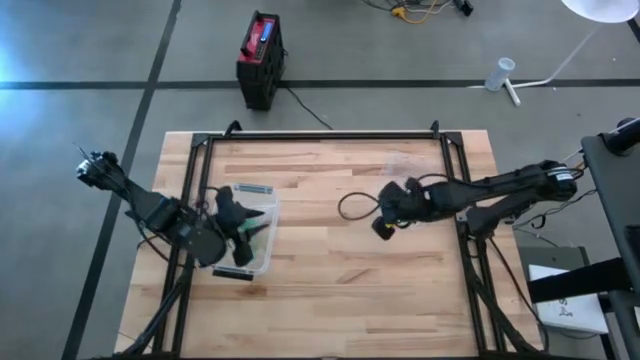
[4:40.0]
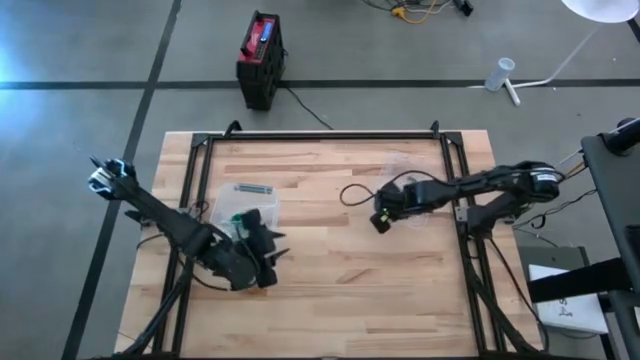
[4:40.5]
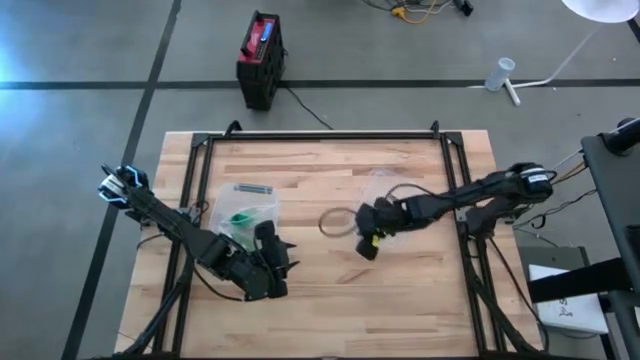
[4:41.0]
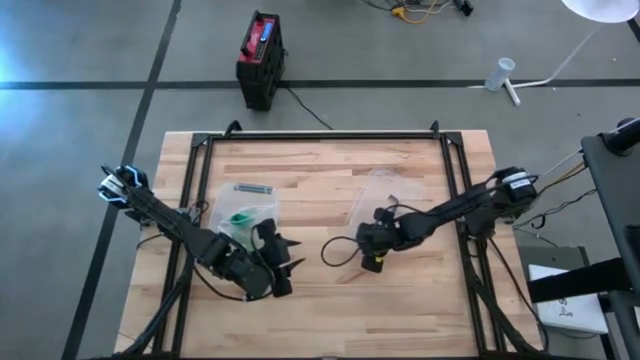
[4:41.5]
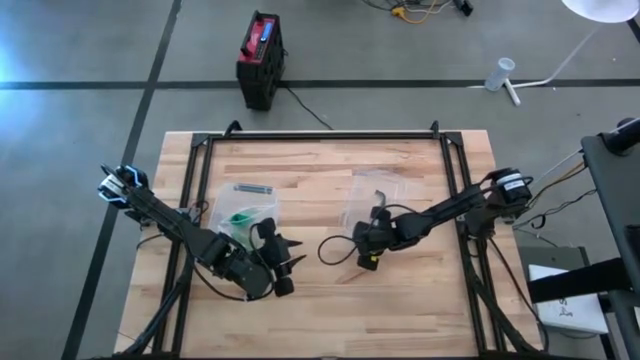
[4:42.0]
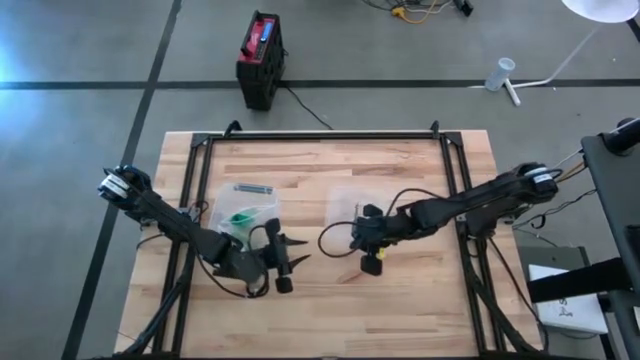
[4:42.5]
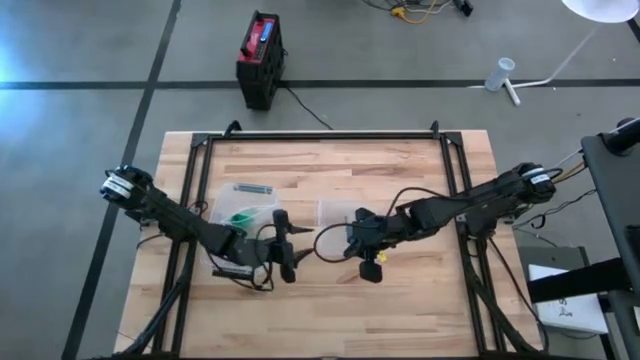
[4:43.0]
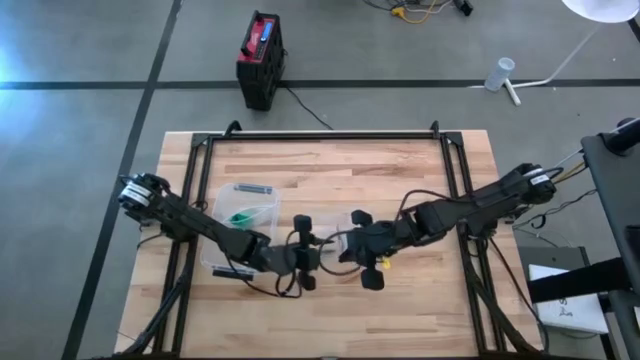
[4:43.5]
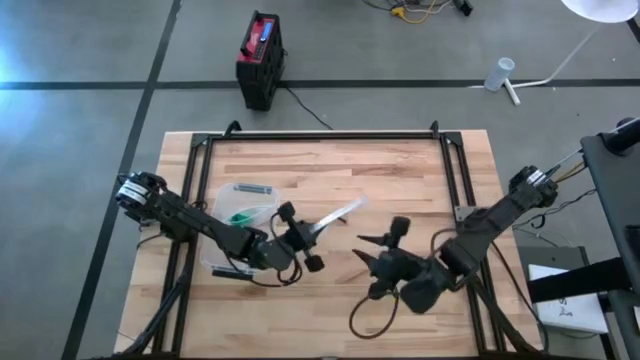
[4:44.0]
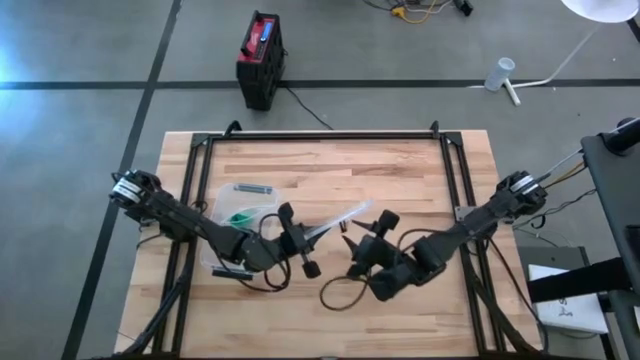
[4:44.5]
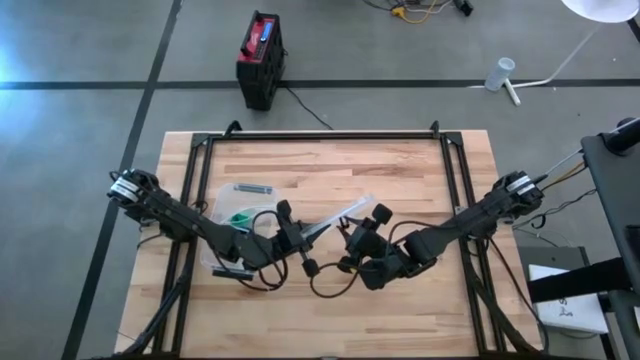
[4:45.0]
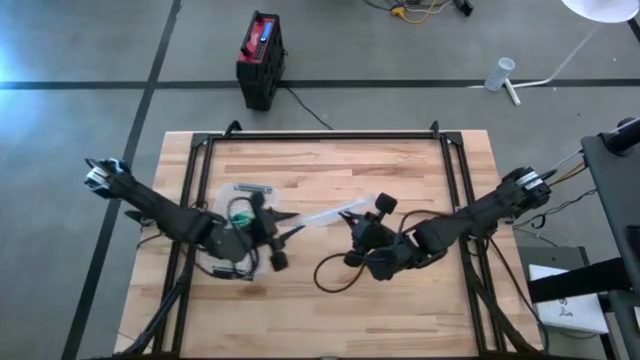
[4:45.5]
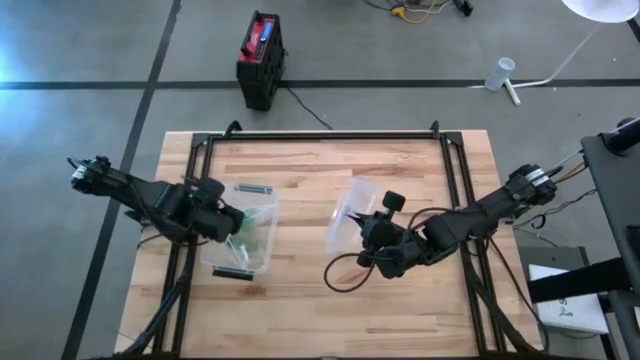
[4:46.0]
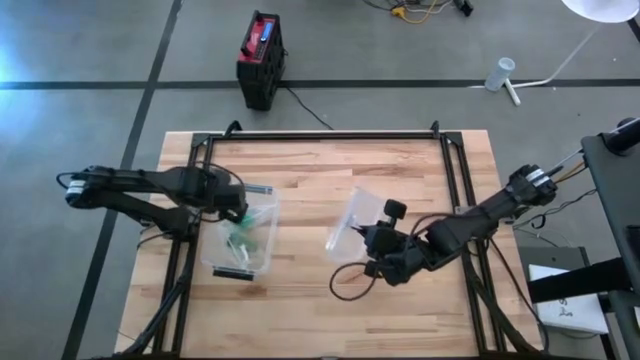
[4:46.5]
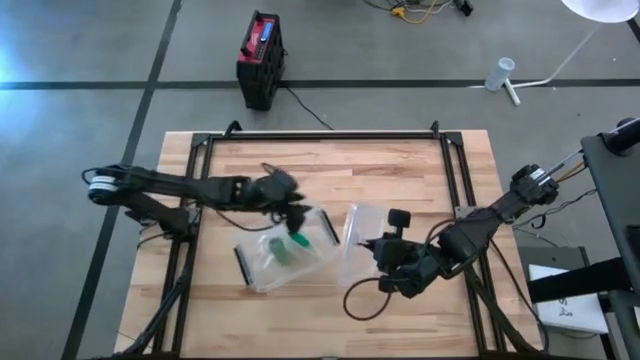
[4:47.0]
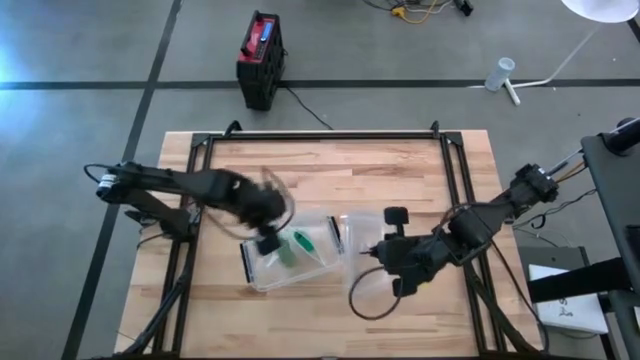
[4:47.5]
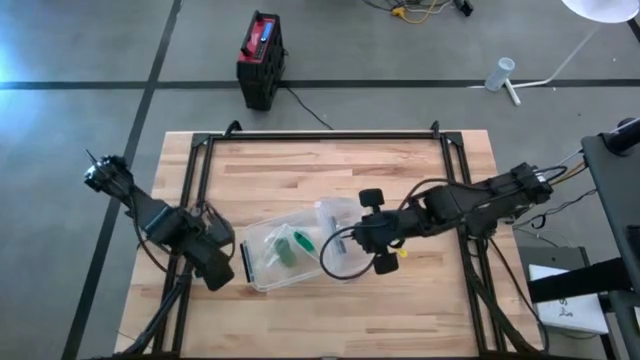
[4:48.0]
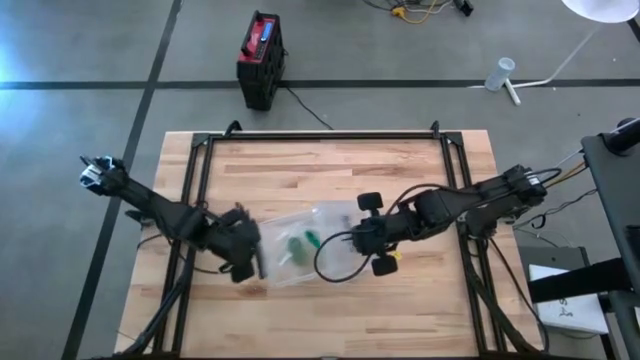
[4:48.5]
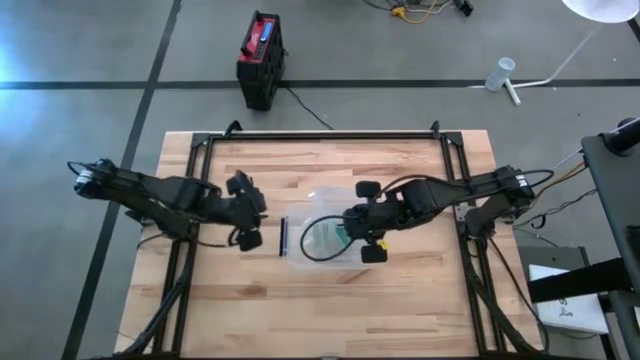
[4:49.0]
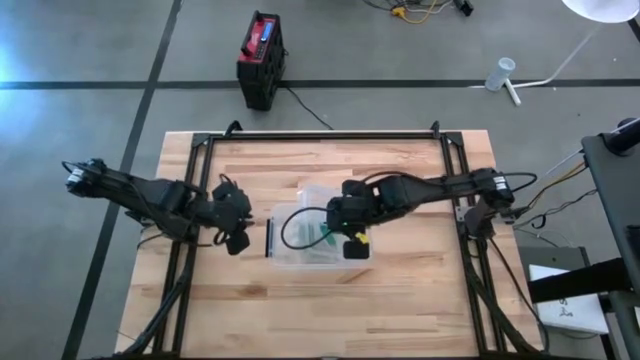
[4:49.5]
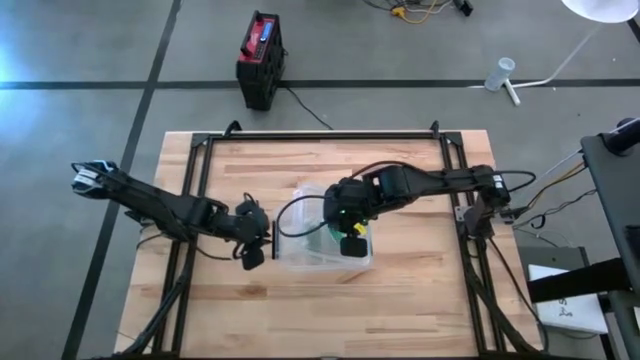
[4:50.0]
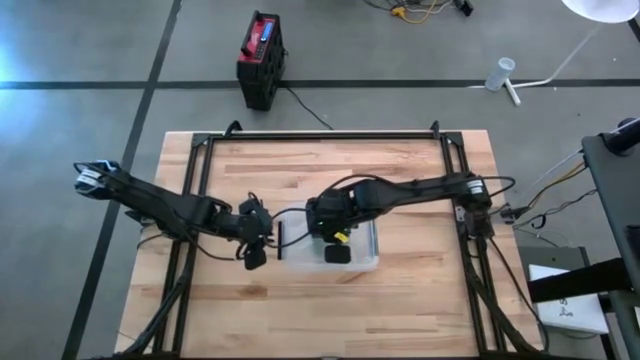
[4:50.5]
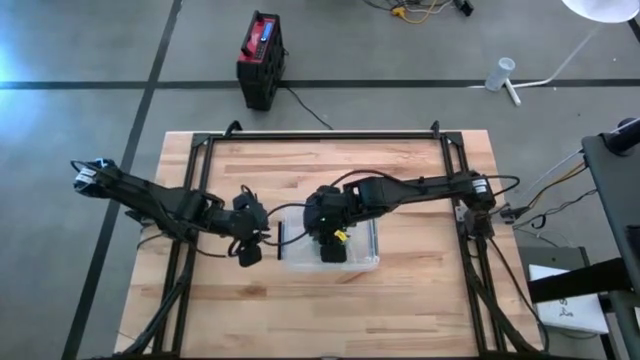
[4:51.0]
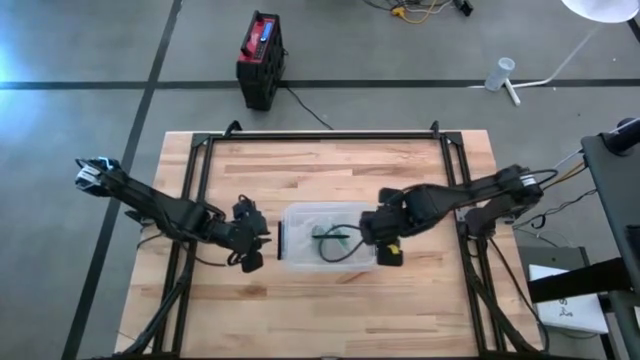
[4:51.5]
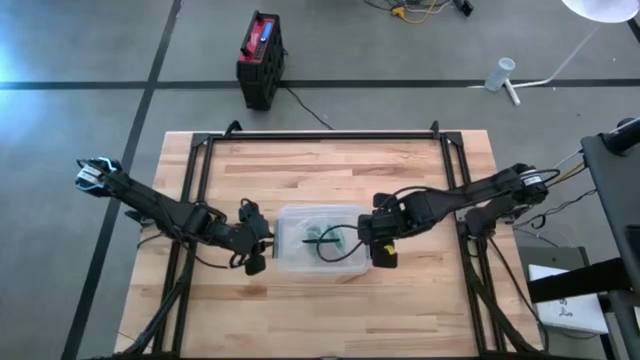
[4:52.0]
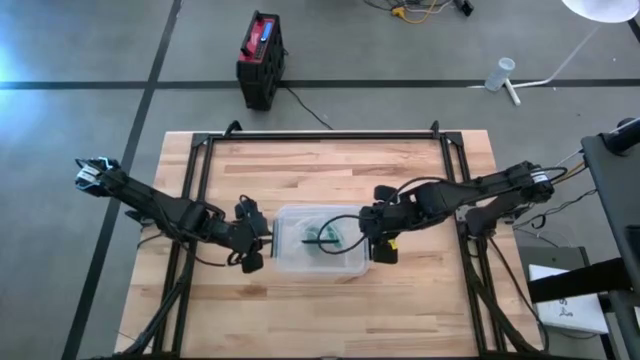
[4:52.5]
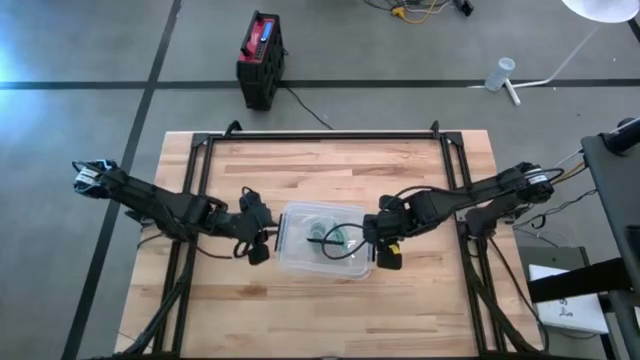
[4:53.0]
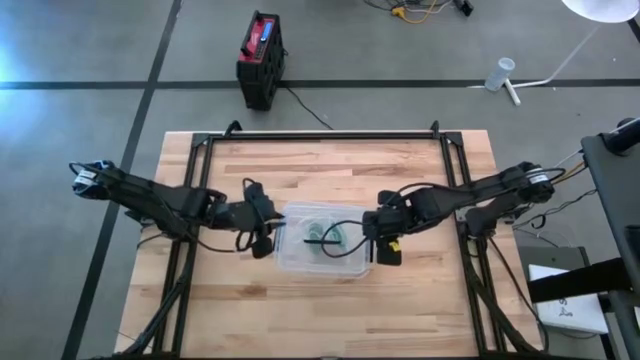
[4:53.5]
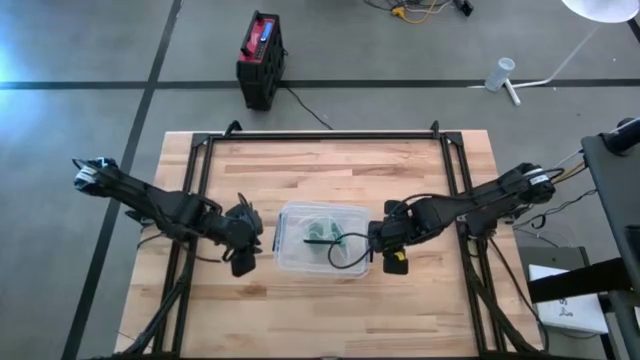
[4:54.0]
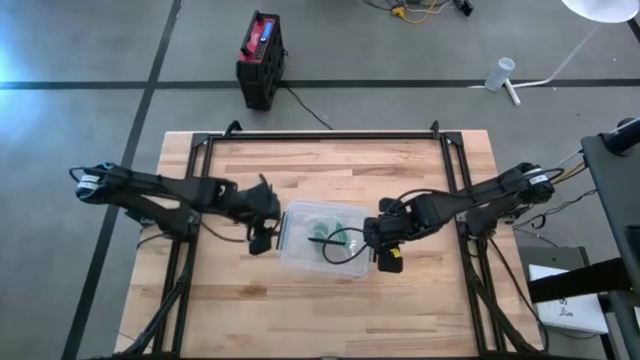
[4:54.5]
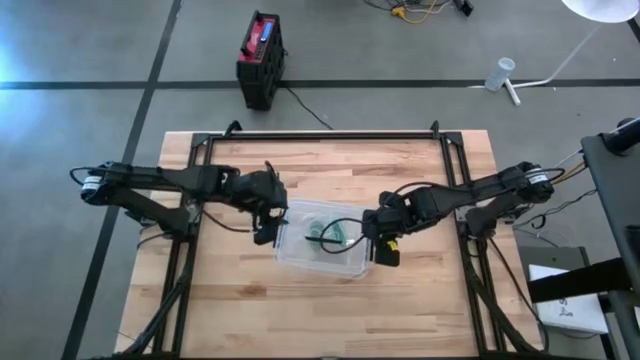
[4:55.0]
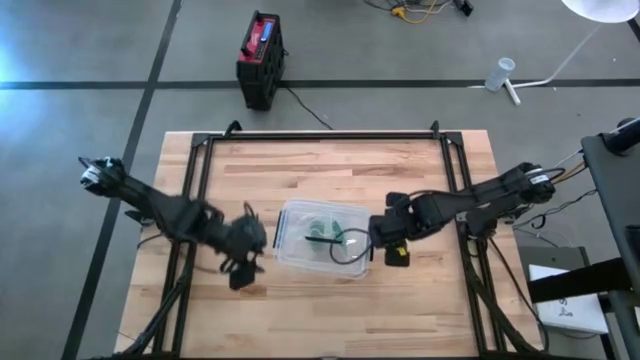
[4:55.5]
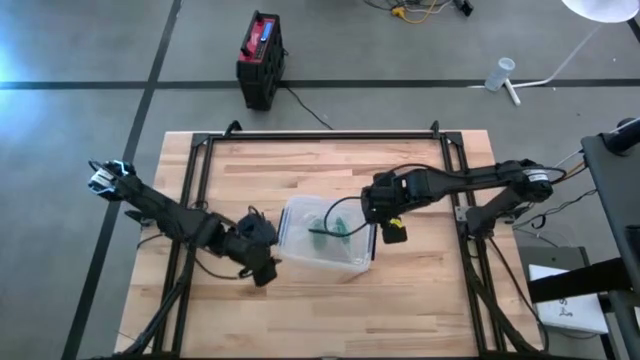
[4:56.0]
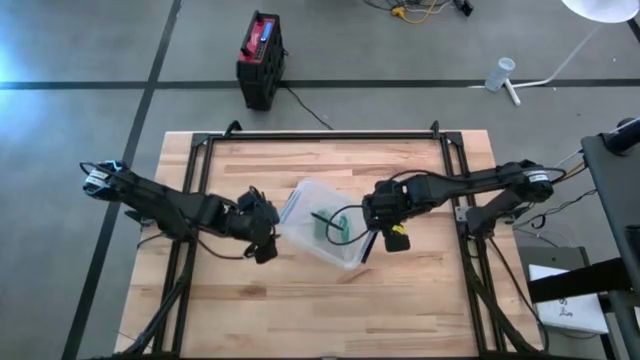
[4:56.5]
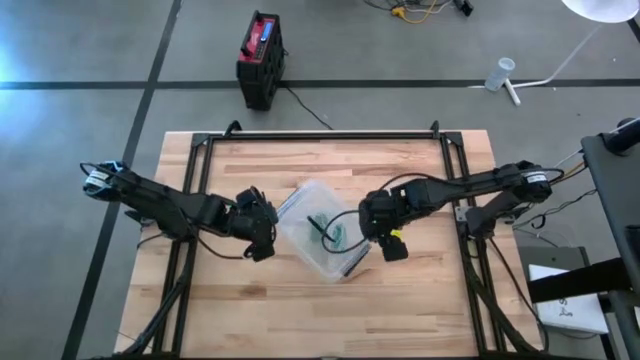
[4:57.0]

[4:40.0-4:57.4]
Task: Roll bandage
Close the transparent bin

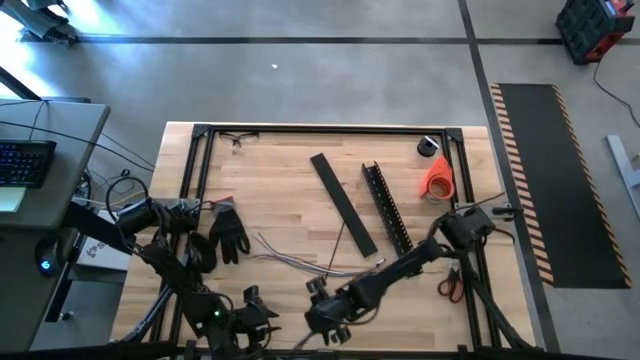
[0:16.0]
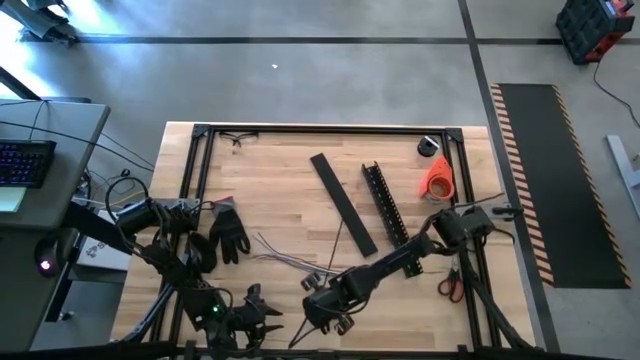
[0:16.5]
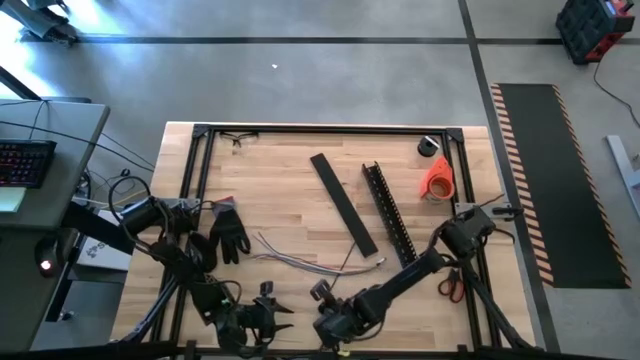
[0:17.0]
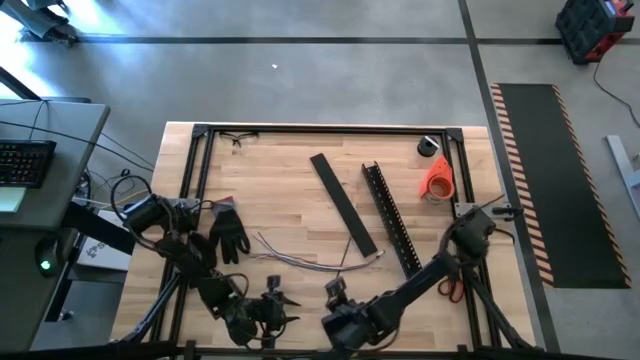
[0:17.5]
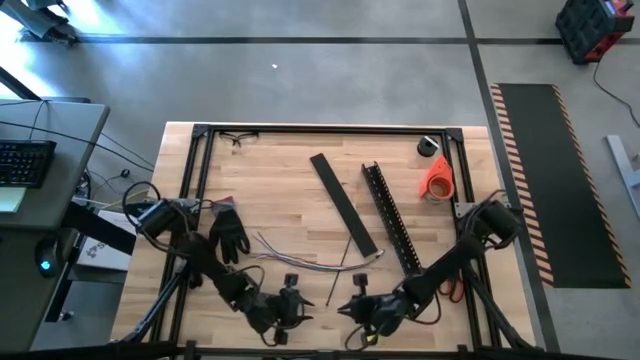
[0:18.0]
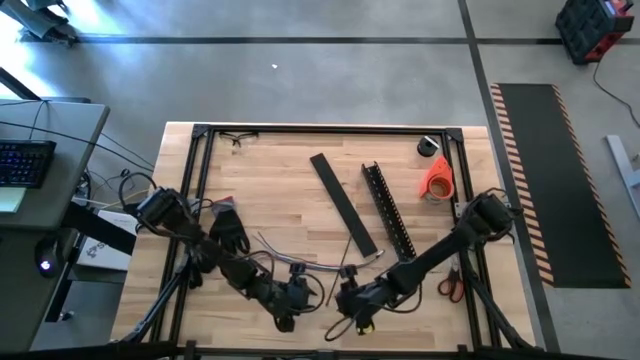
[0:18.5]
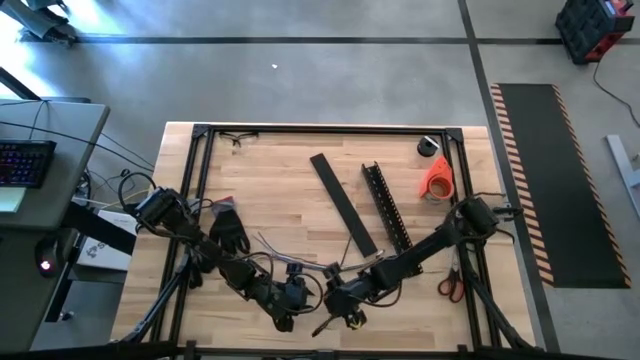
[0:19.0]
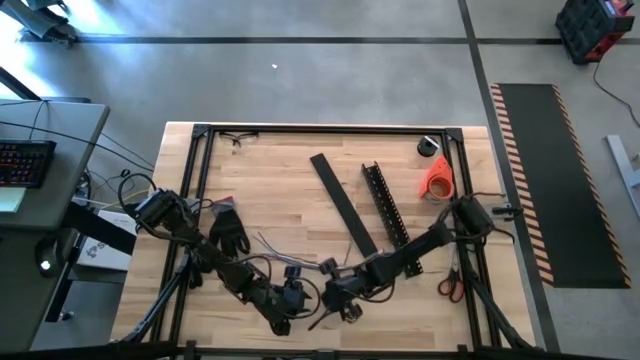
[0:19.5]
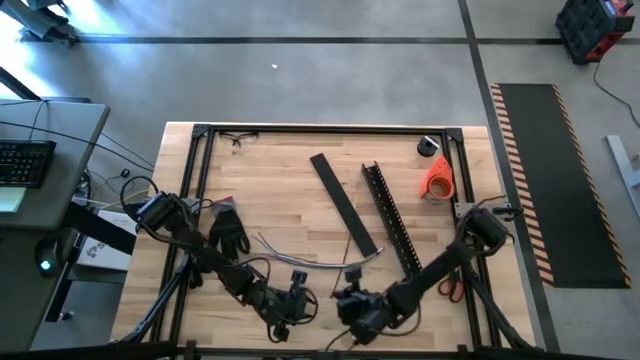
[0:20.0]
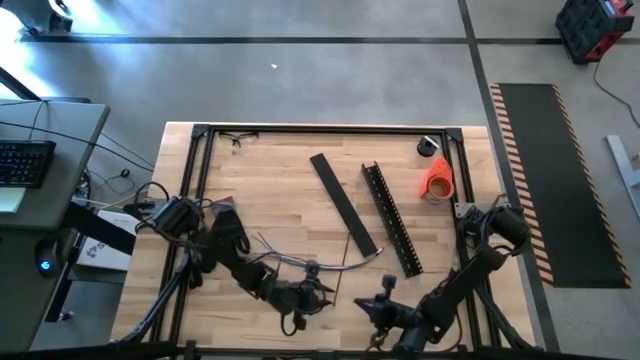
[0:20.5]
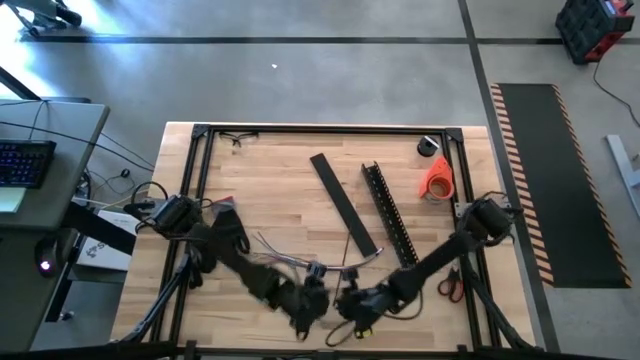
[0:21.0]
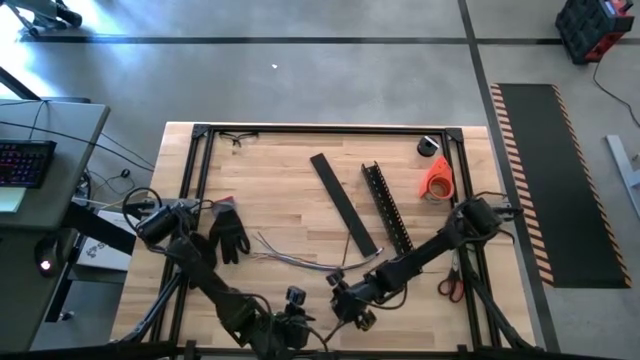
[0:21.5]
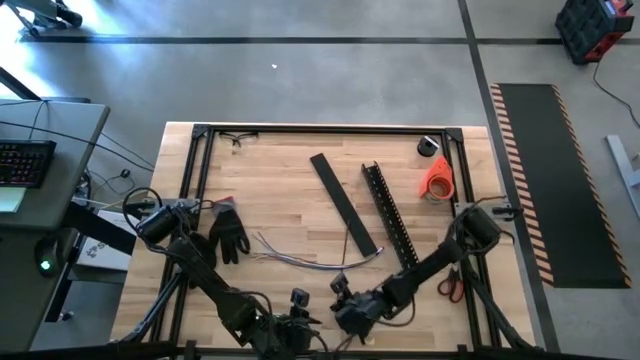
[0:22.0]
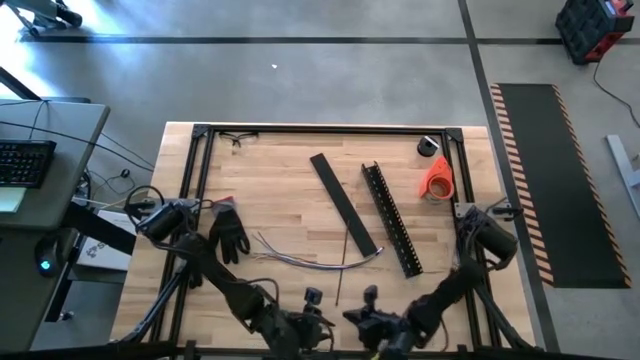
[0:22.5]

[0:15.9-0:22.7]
Task: Ziptie cables
Wrap the black zip tie on the cables
